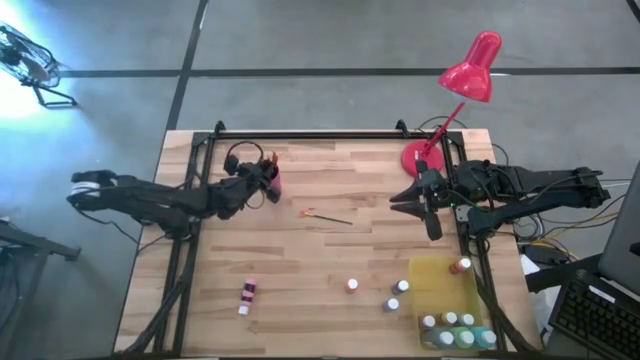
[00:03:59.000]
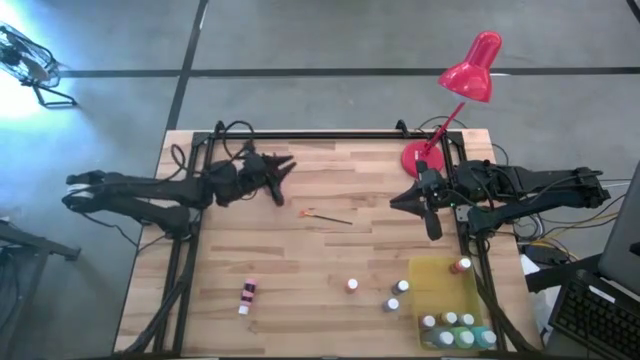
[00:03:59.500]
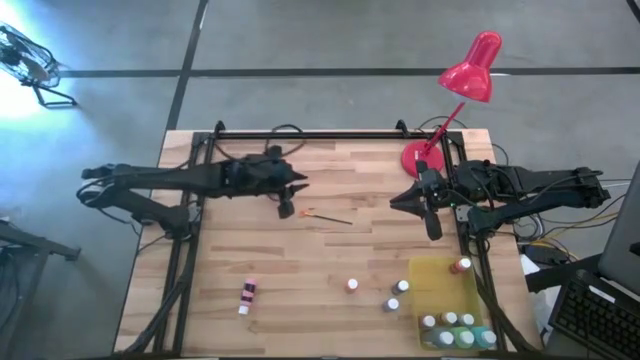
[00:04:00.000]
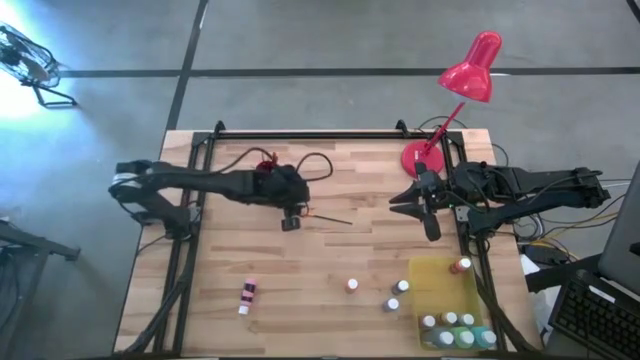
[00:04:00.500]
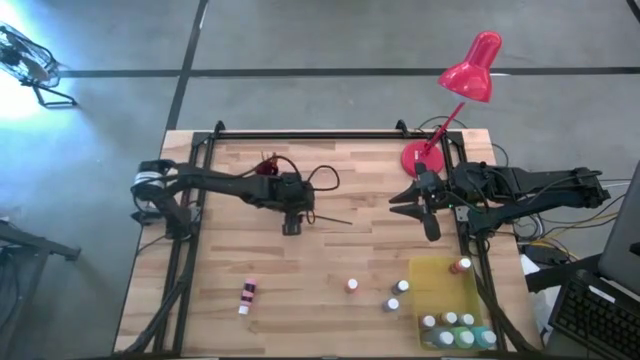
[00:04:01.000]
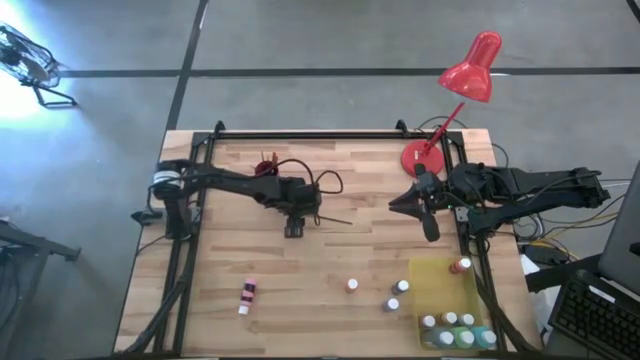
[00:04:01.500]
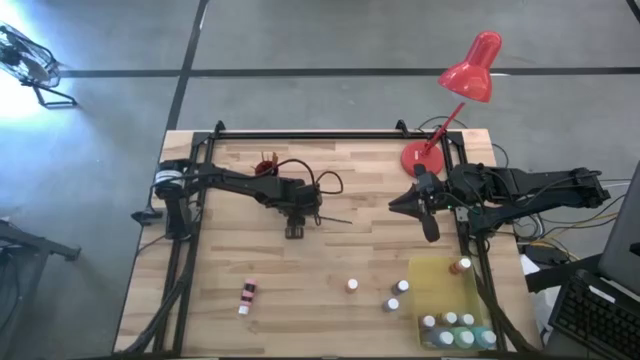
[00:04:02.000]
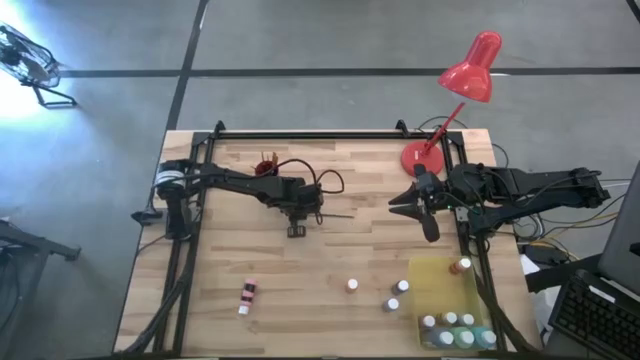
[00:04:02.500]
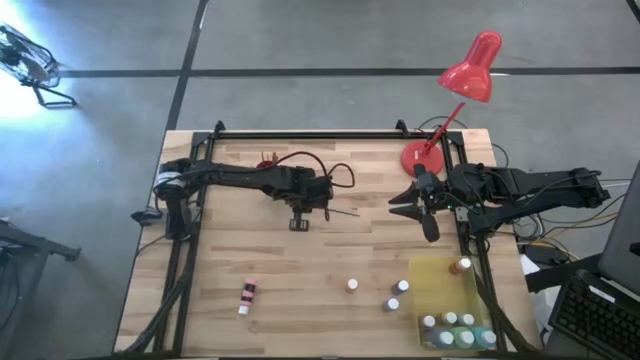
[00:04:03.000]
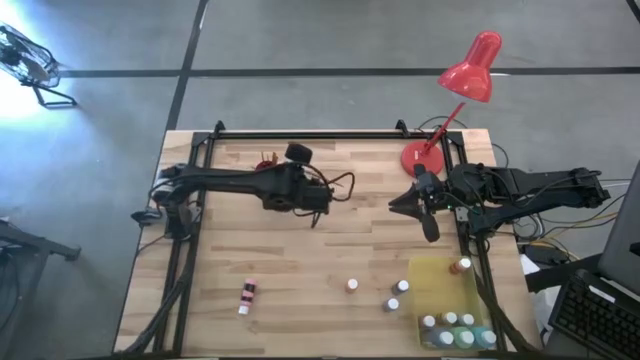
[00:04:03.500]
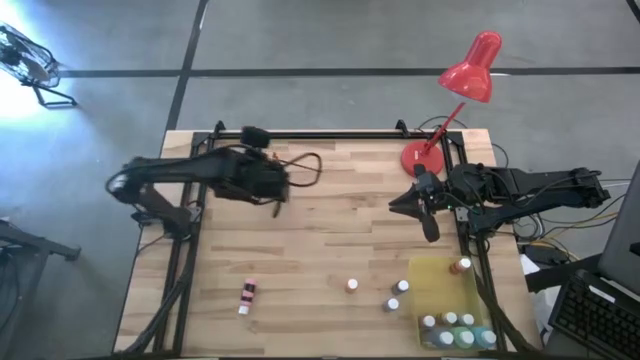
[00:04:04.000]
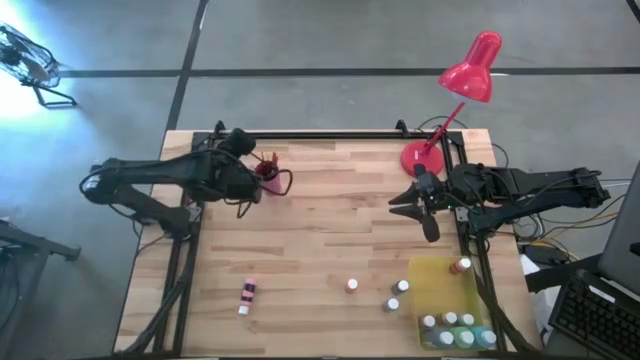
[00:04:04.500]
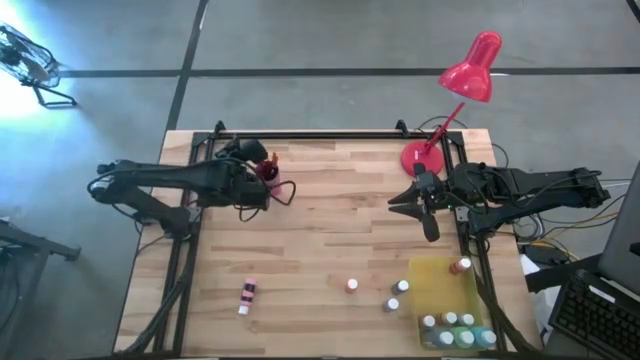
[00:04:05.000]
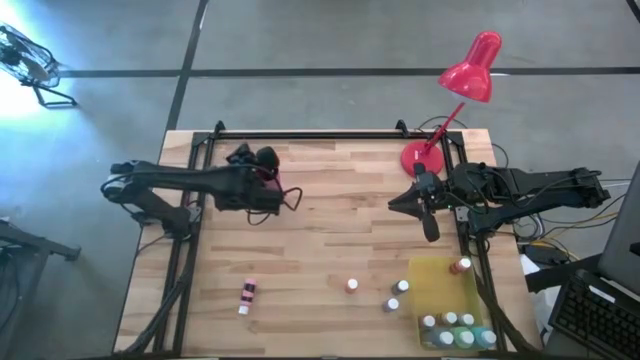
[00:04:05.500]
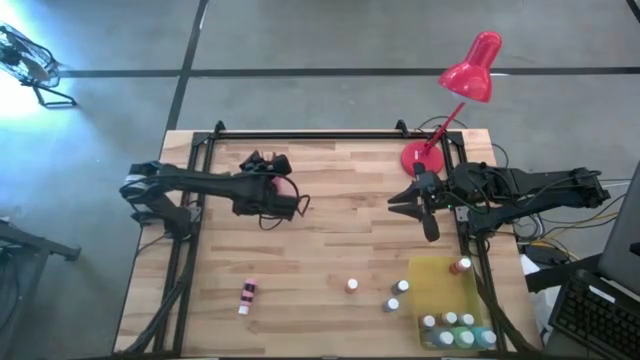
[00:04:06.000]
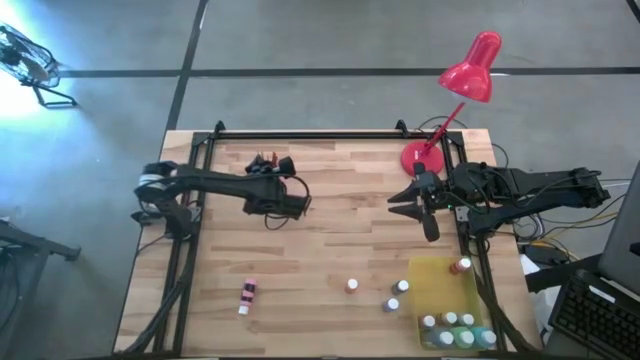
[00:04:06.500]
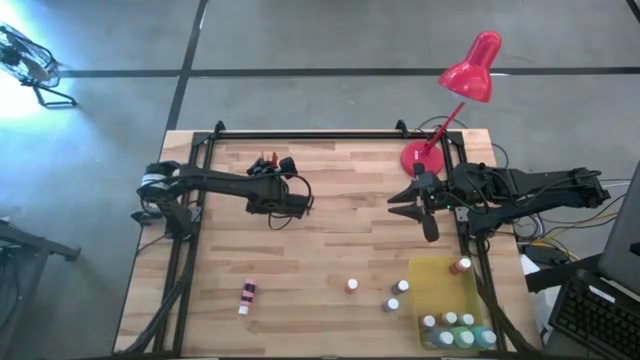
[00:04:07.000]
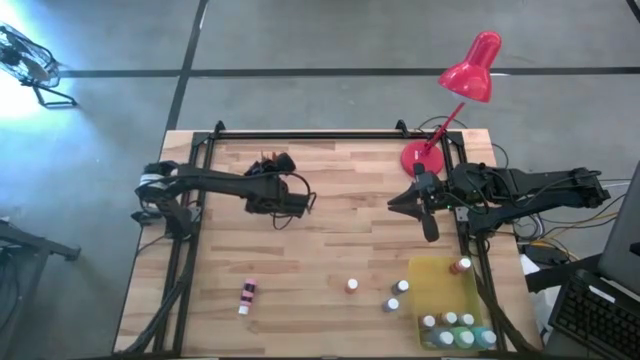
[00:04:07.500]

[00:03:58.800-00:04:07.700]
Task: Pick & Place Paint Supplies
Put the black paint brush into the pink cup

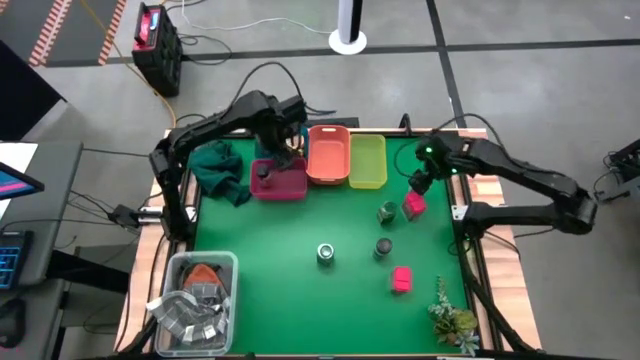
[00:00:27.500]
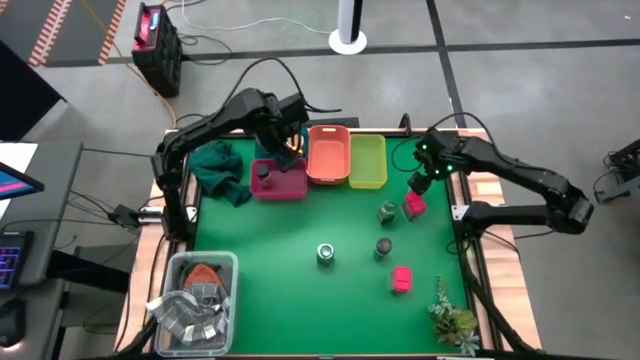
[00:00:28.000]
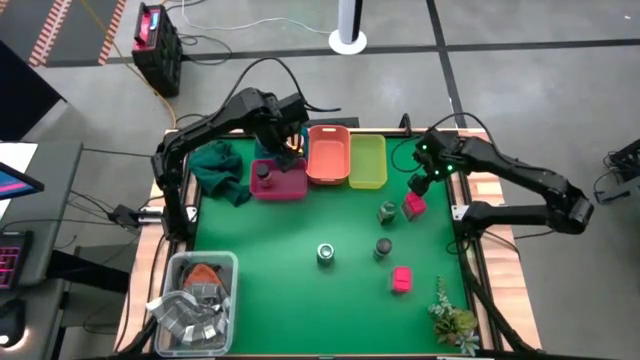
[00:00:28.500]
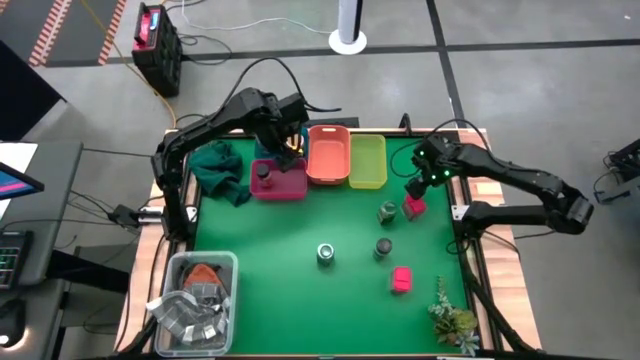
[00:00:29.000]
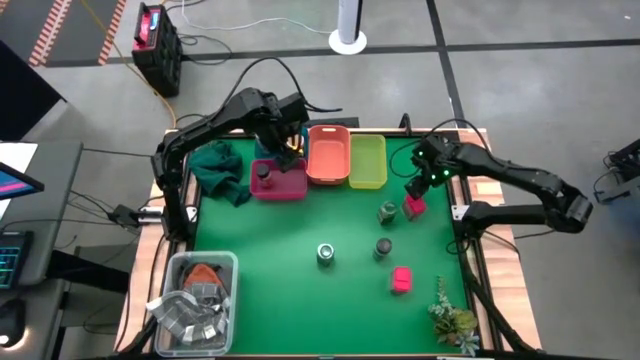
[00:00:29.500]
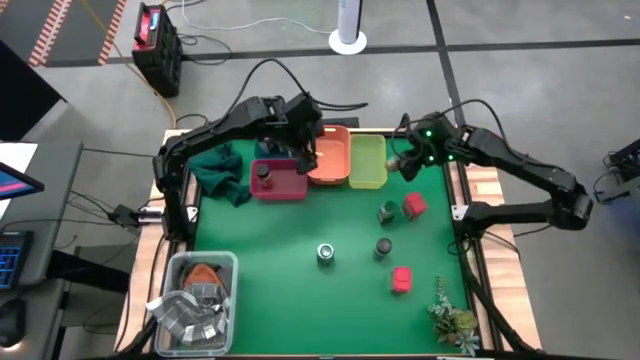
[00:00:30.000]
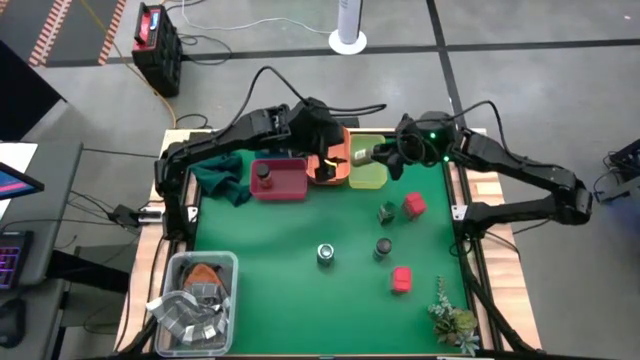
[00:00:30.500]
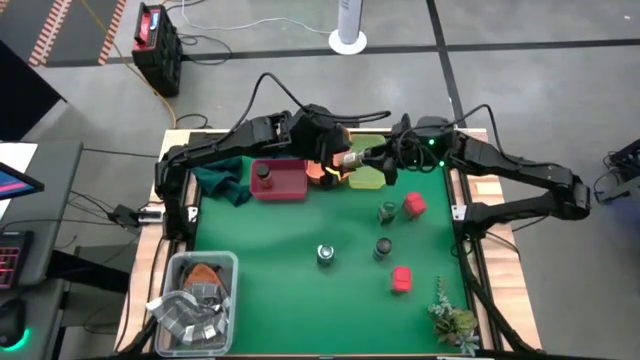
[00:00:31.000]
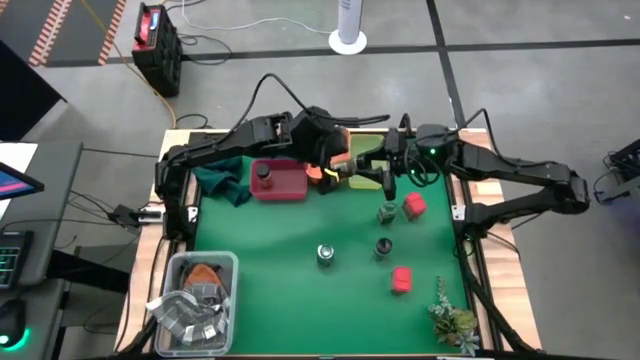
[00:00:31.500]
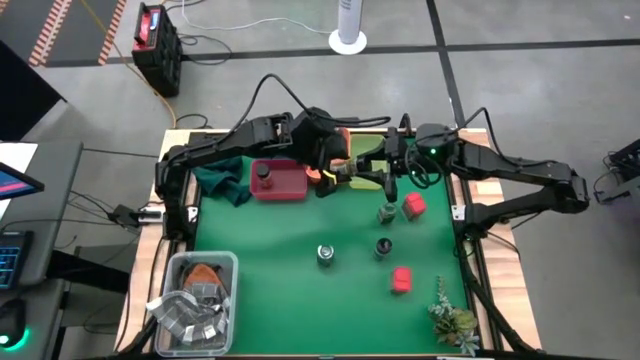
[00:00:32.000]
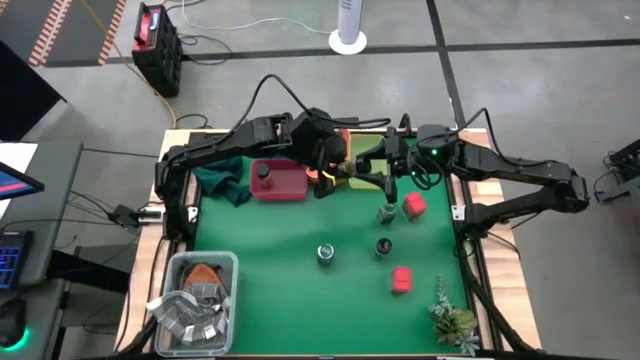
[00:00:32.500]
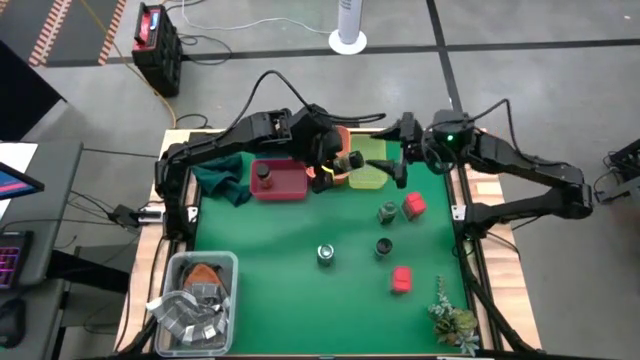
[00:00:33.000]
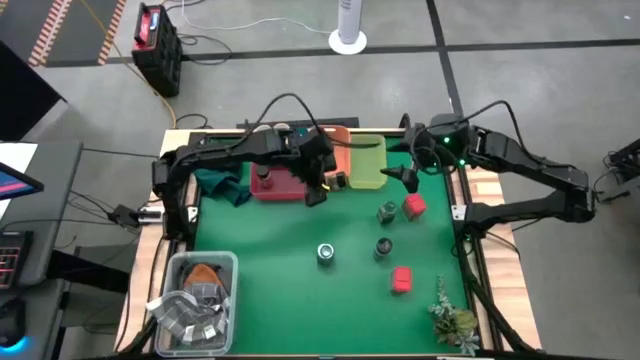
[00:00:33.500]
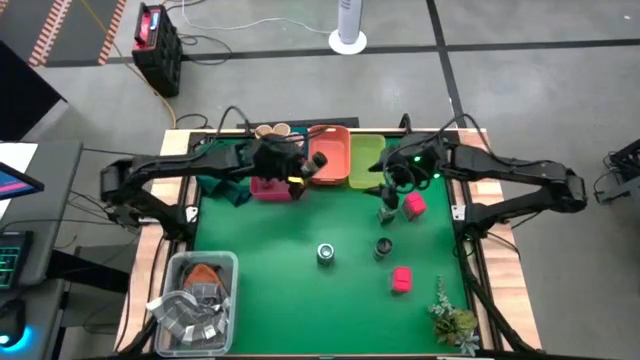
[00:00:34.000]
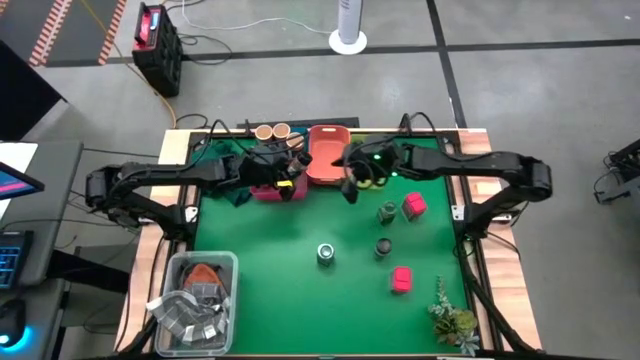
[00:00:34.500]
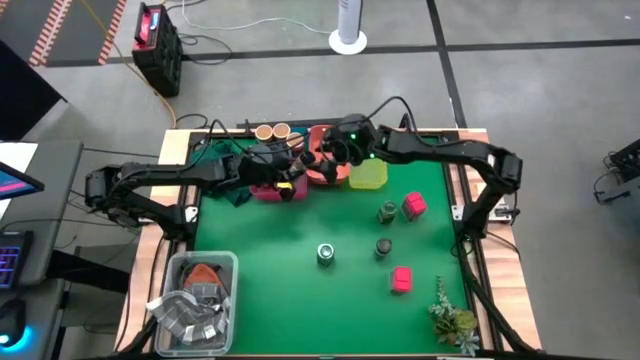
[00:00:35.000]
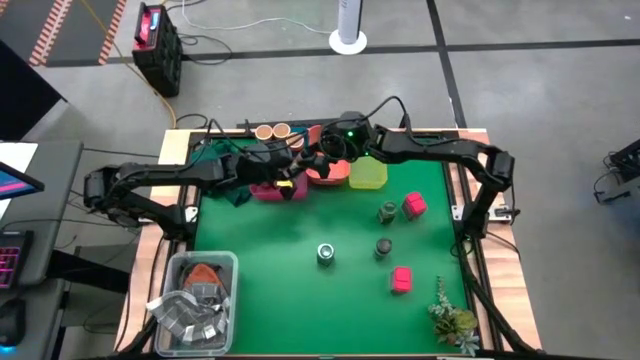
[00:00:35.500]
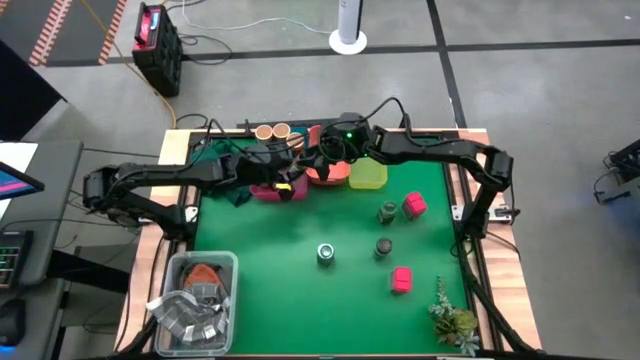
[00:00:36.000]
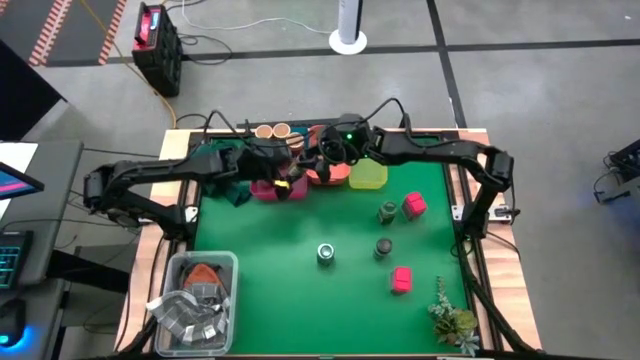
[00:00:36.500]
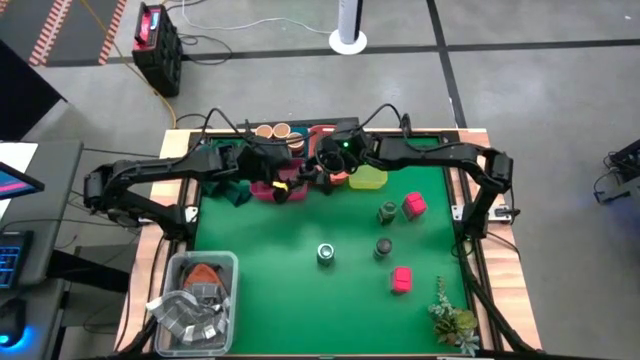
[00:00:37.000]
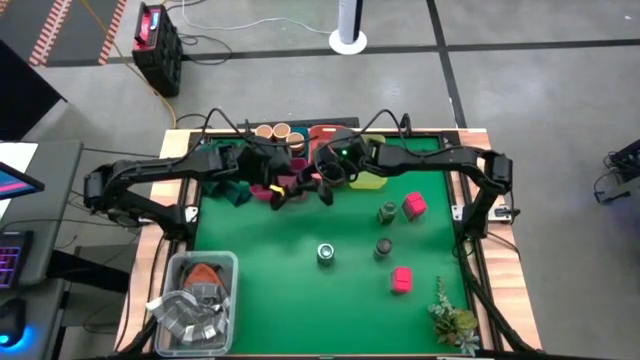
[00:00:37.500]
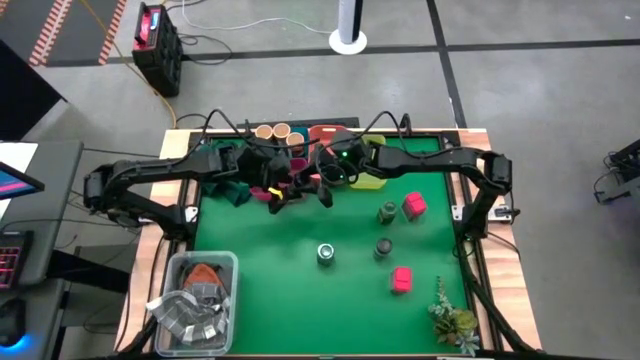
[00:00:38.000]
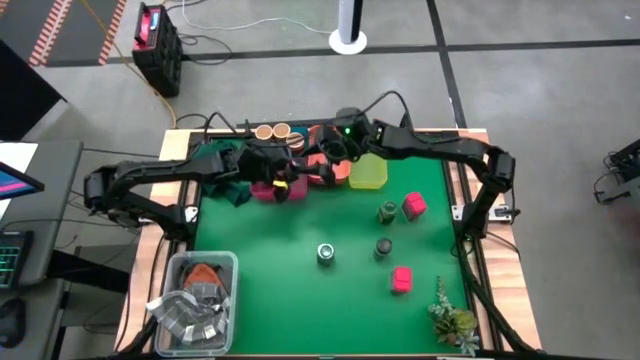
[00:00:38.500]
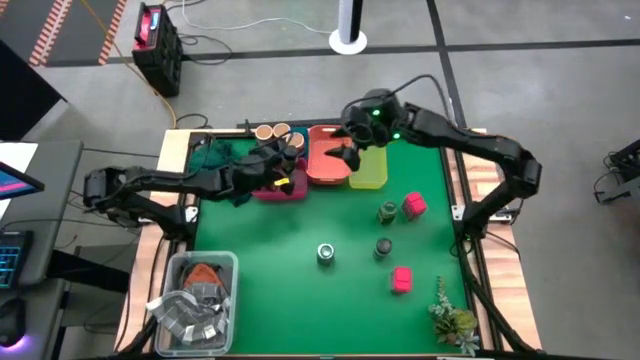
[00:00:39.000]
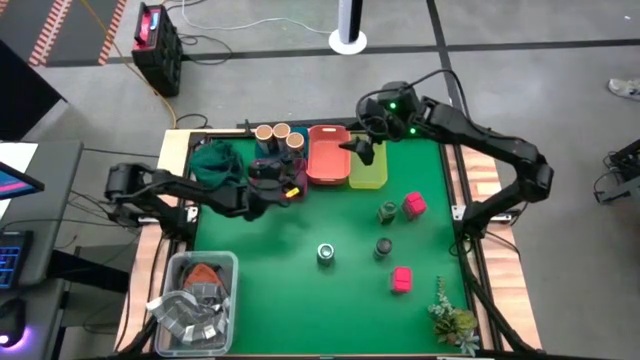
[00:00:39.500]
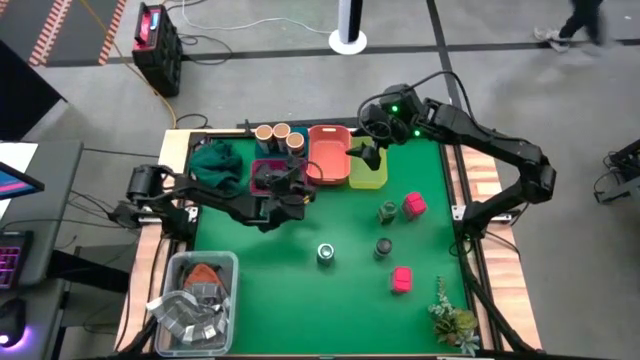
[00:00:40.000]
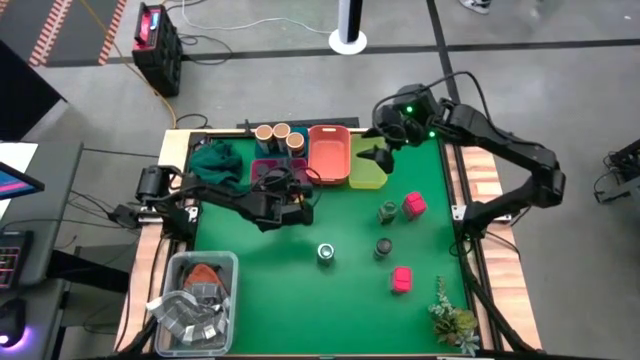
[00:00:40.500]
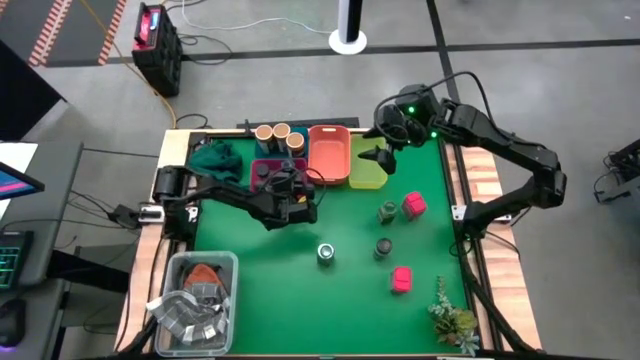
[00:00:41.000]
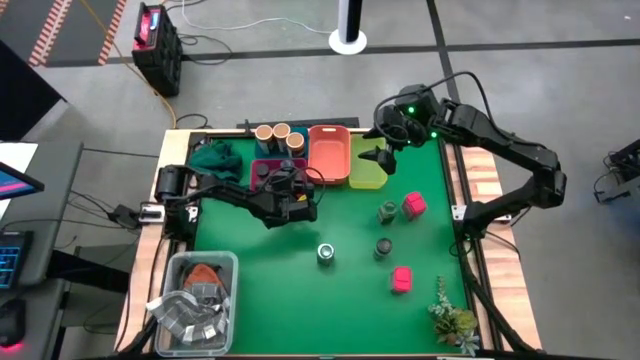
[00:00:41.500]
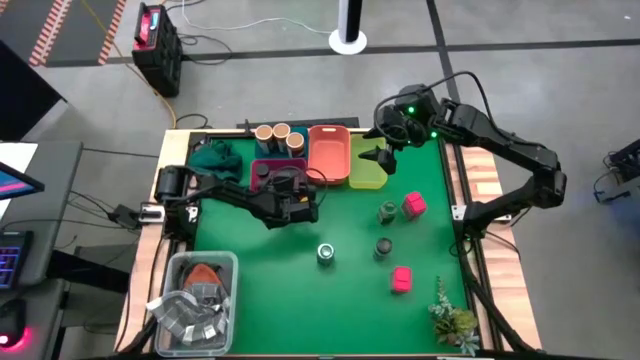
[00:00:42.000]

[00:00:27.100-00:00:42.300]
Task: Sort spices by type
Put the top black seasoning bottle into the red bin
